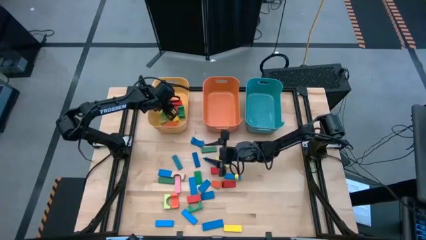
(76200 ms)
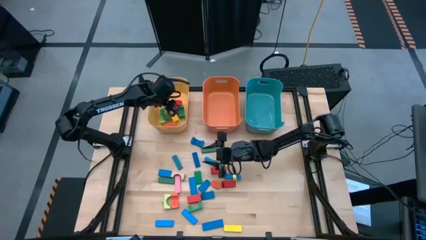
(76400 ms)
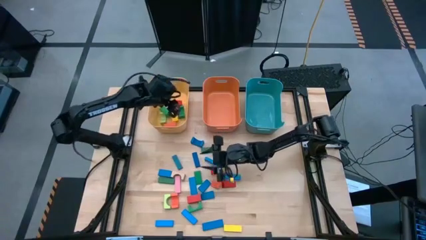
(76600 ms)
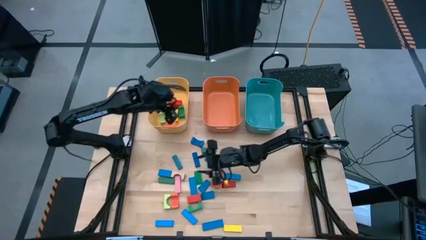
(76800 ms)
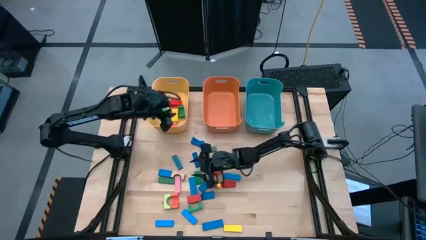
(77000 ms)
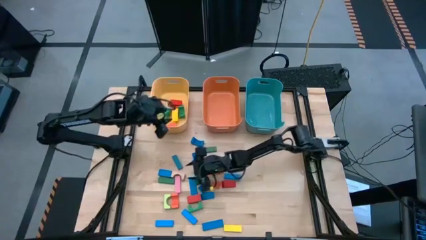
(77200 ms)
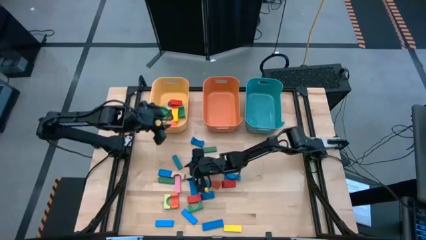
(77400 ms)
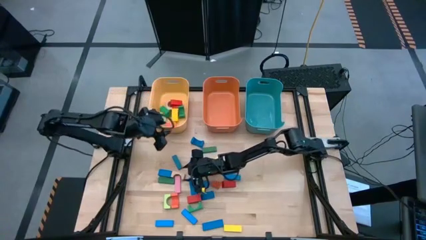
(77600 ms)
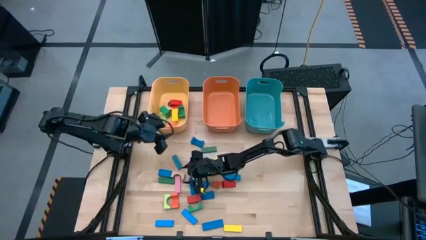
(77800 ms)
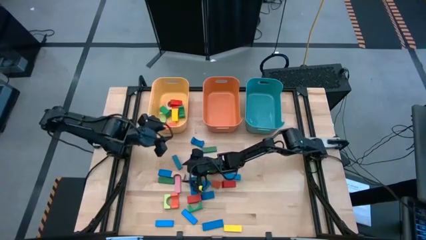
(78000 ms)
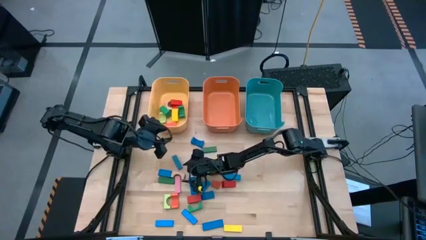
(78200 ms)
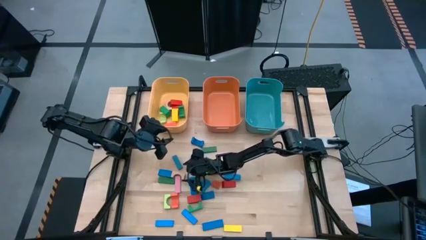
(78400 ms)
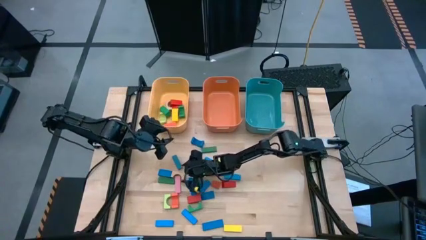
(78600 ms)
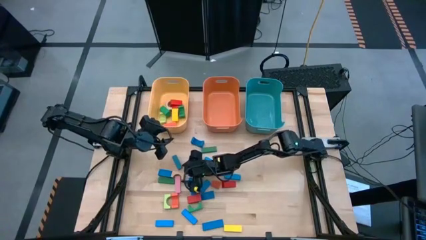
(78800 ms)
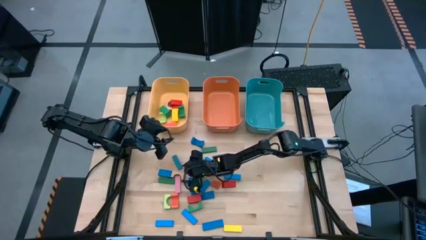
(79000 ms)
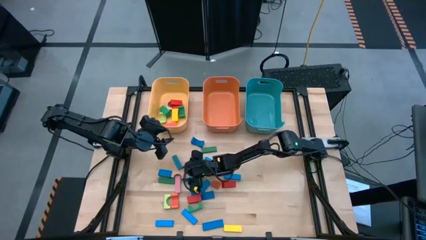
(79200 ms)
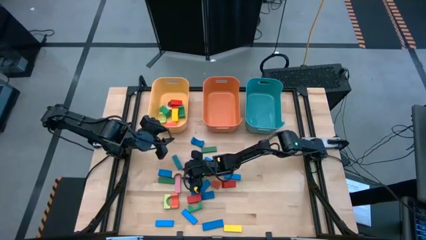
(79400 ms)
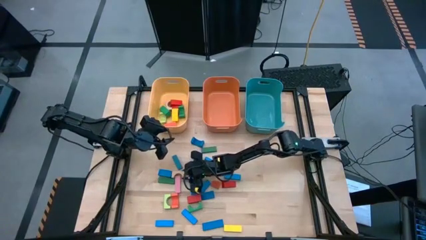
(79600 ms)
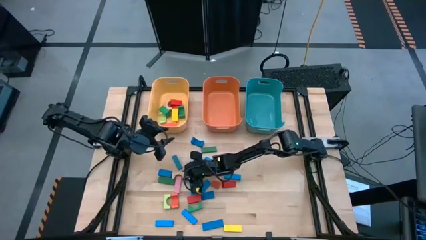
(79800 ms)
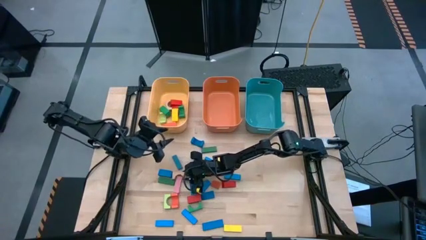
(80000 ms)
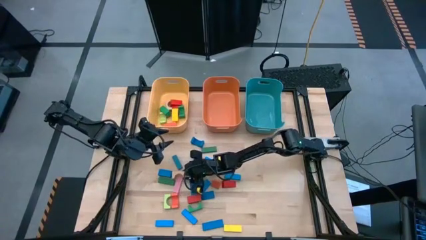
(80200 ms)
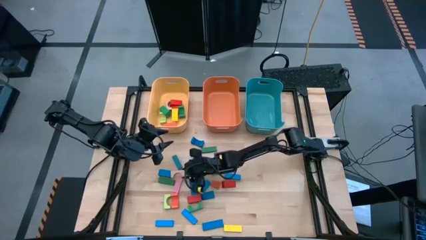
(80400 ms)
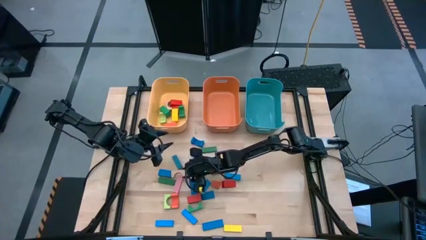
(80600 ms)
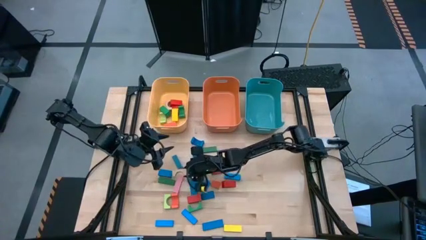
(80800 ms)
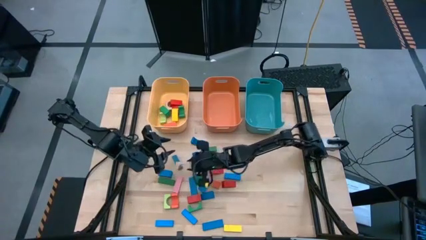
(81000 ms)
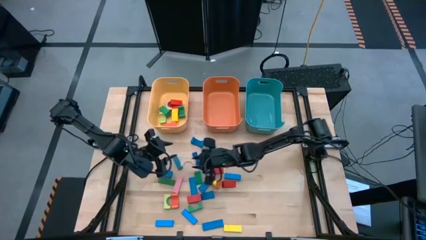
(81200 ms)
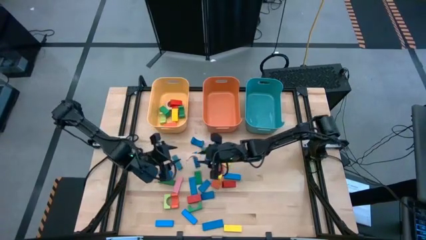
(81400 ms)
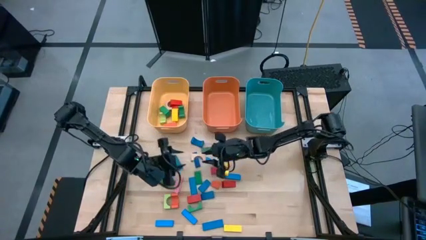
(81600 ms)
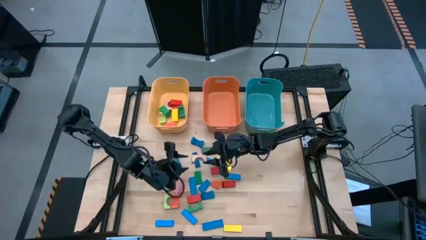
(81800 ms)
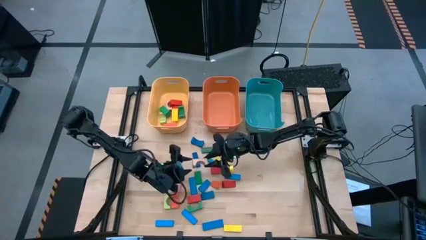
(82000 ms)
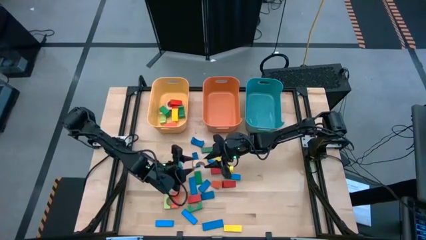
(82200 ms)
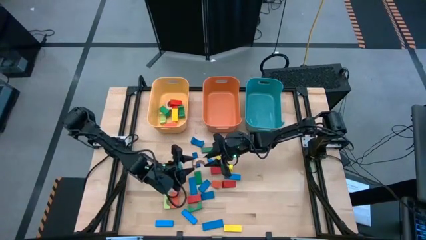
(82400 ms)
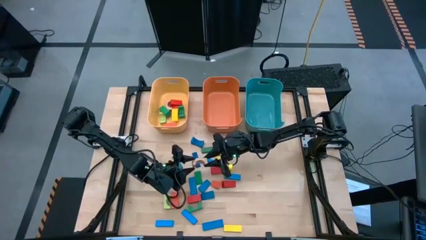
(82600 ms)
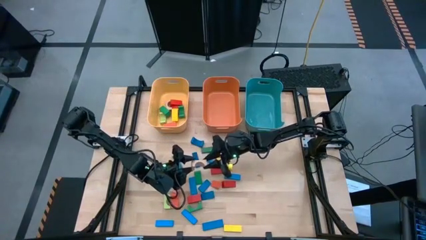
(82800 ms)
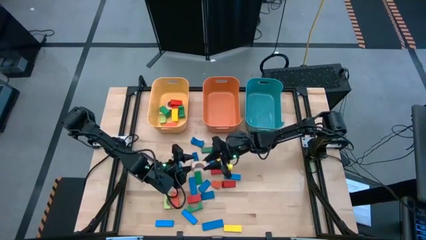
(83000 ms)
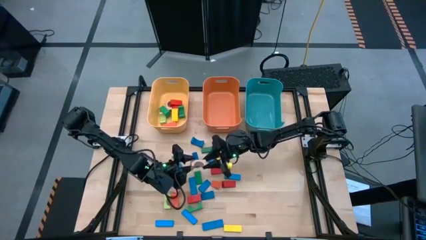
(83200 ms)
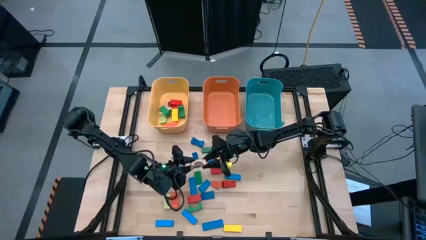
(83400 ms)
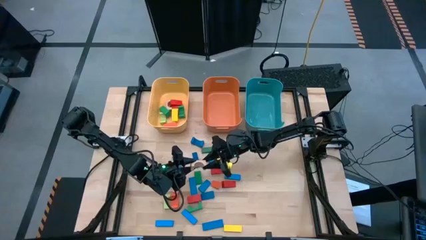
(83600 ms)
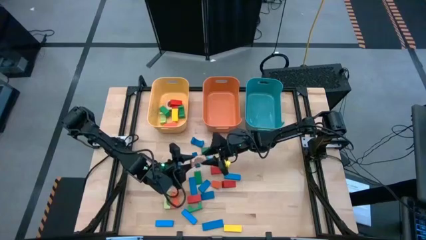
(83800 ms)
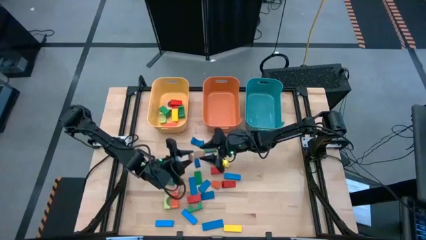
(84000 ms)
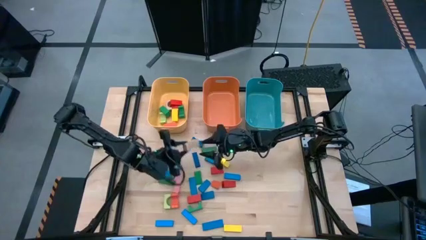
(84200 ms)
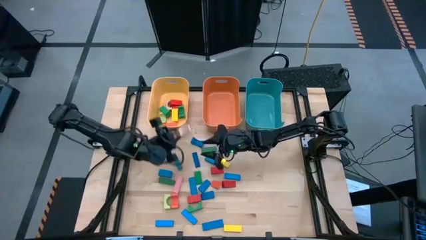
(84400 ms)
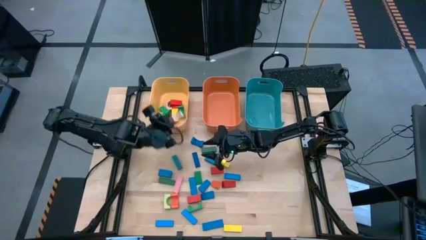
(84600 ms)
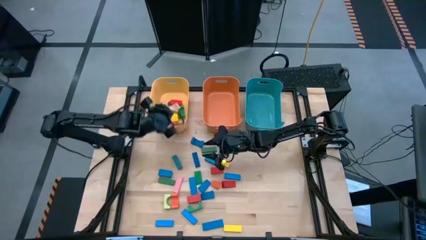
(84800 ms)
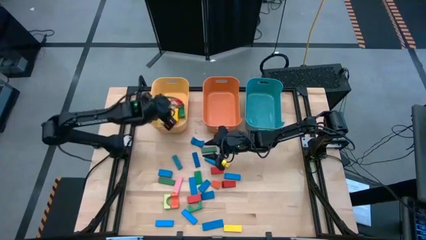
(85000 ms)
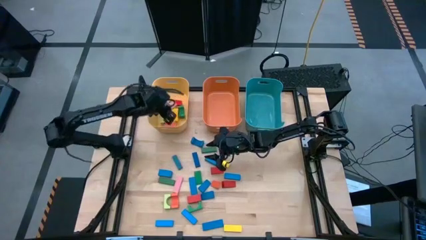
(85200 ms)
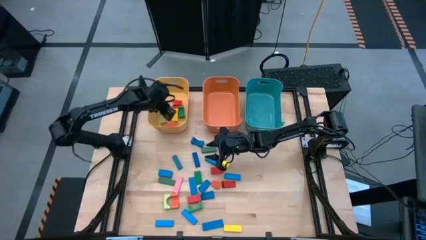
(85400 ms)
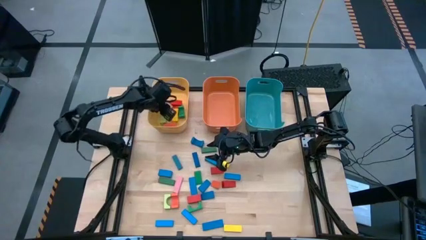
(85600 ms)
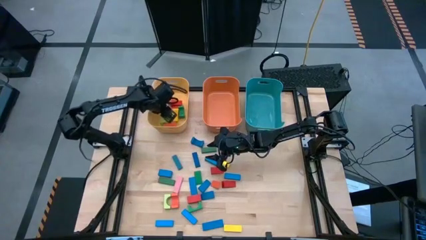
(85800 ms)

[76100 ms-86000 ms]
Task: Sort blocks by size
Put the gray arch block into the yellow bin

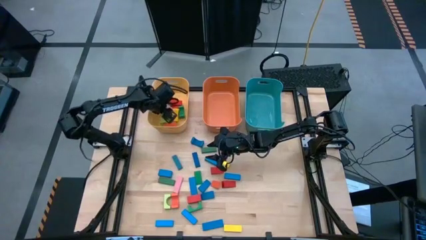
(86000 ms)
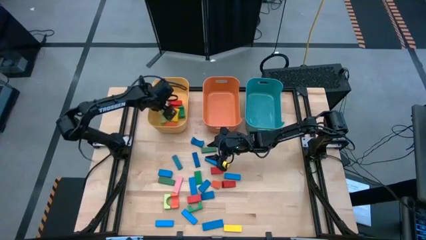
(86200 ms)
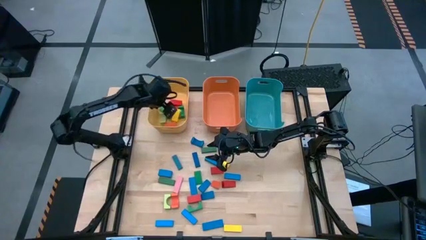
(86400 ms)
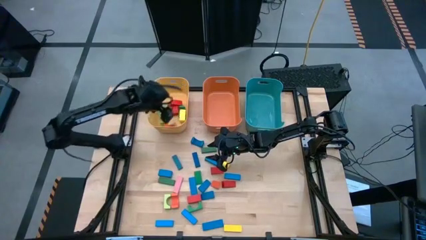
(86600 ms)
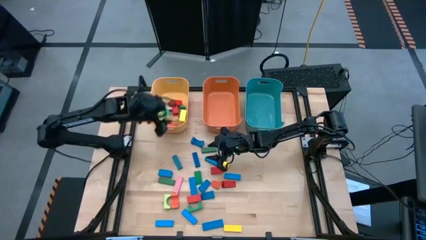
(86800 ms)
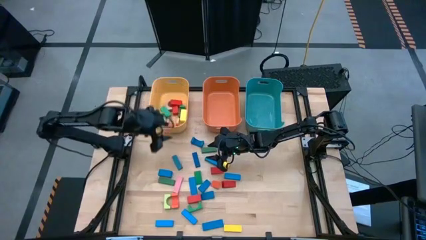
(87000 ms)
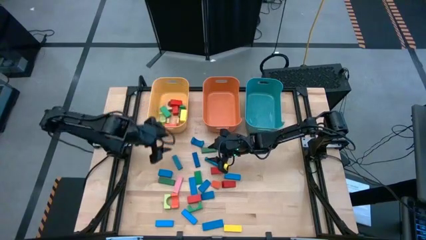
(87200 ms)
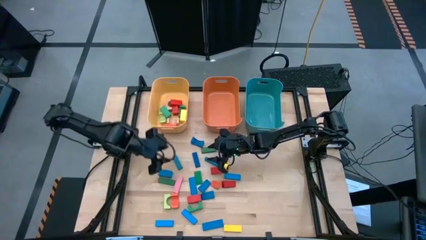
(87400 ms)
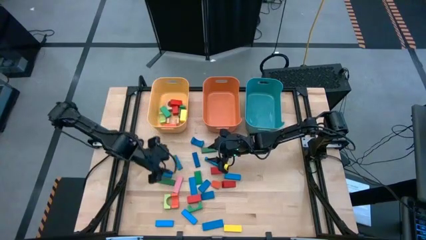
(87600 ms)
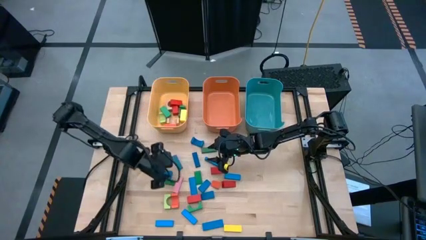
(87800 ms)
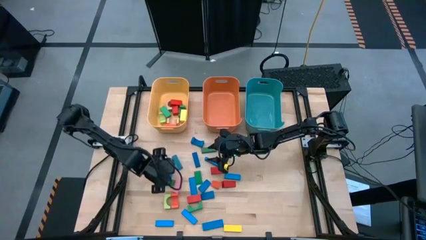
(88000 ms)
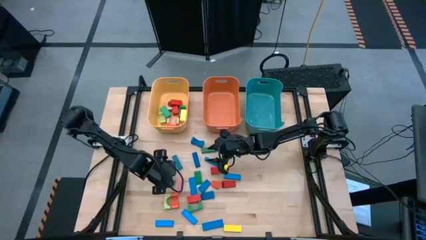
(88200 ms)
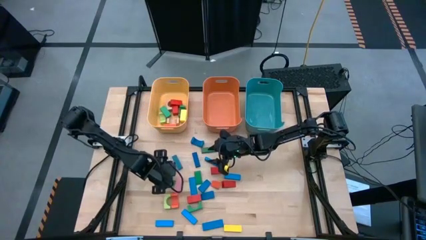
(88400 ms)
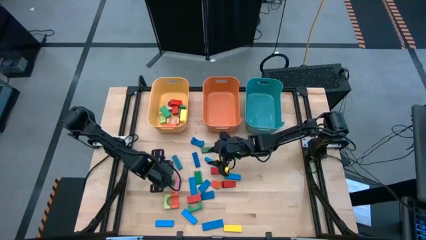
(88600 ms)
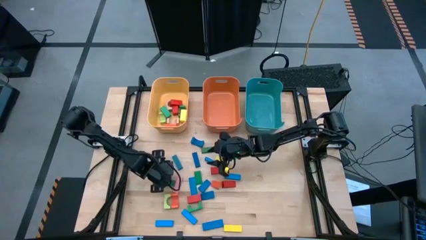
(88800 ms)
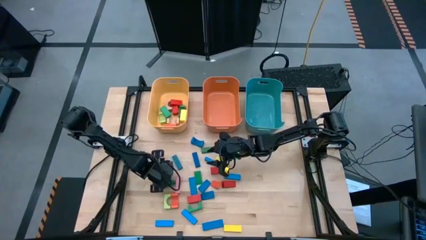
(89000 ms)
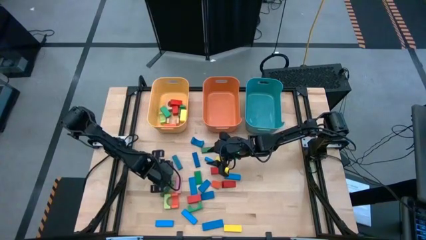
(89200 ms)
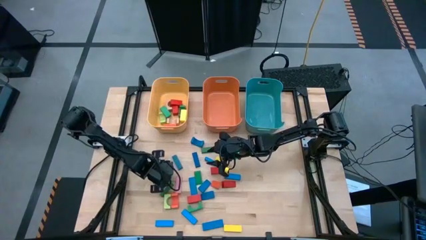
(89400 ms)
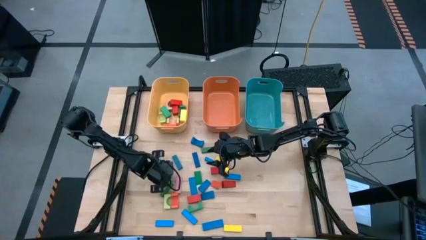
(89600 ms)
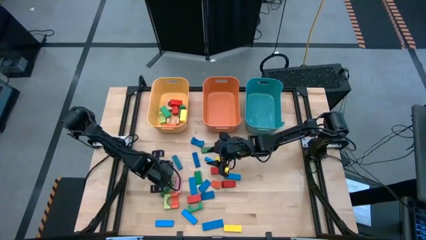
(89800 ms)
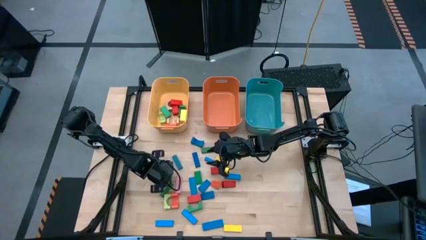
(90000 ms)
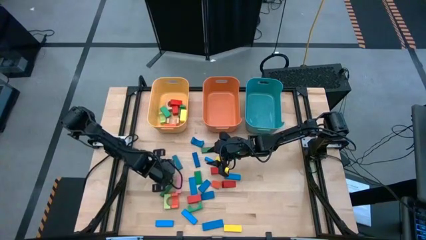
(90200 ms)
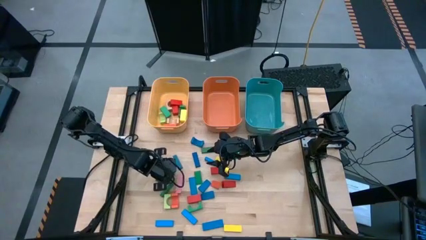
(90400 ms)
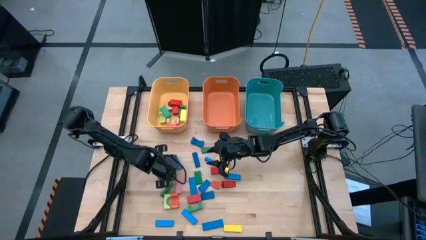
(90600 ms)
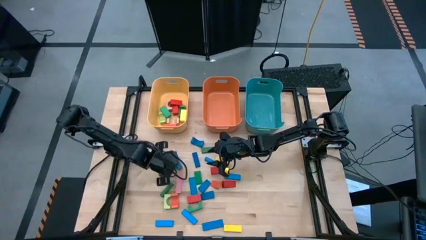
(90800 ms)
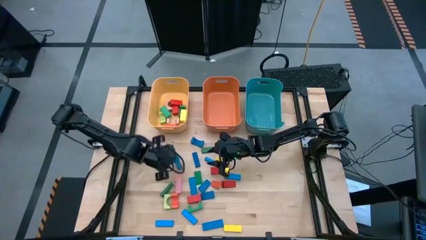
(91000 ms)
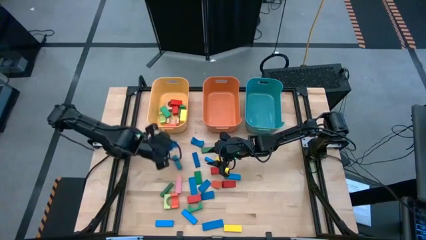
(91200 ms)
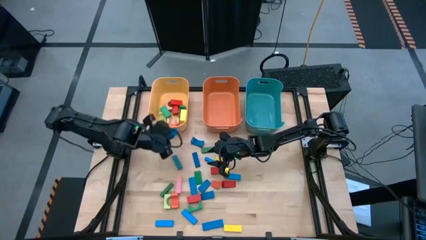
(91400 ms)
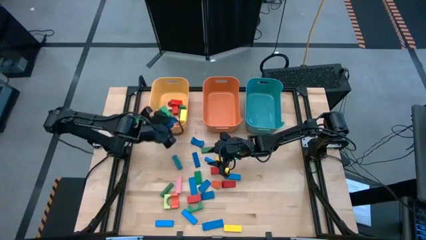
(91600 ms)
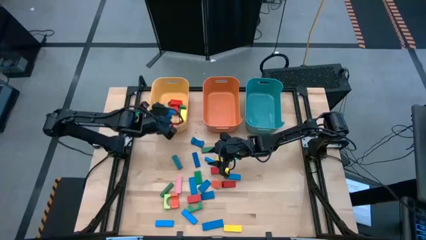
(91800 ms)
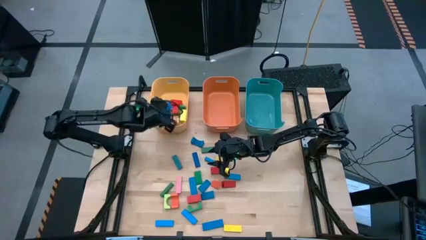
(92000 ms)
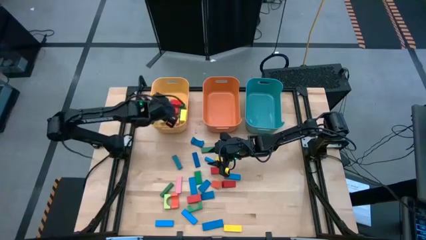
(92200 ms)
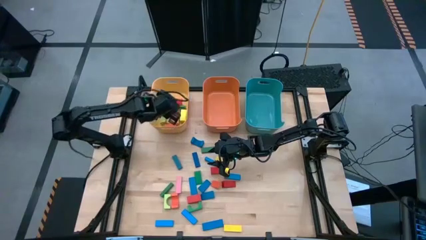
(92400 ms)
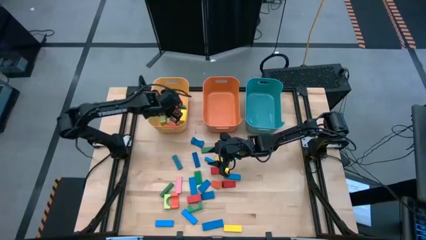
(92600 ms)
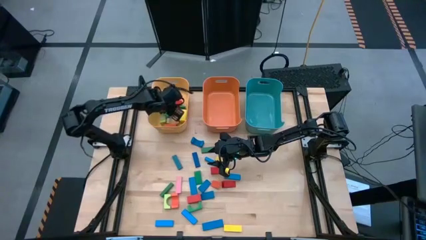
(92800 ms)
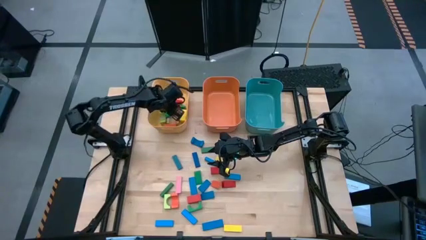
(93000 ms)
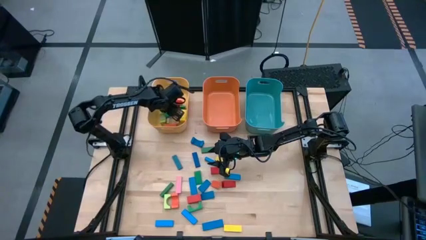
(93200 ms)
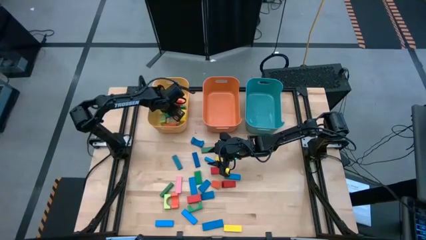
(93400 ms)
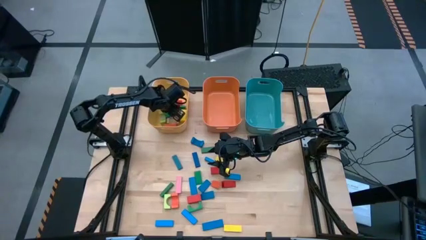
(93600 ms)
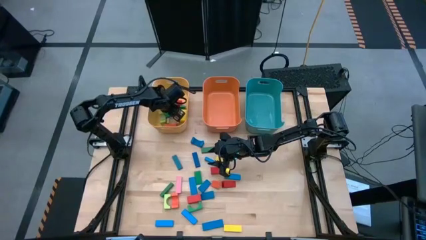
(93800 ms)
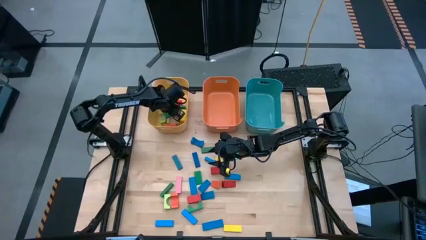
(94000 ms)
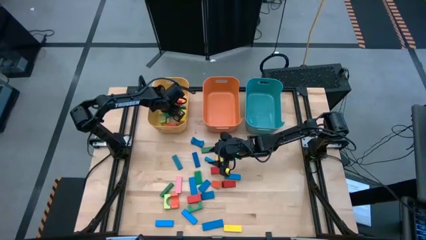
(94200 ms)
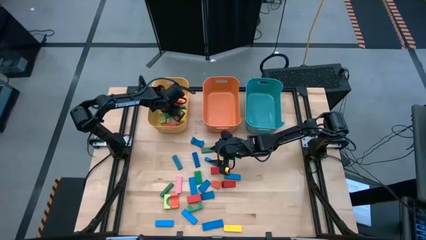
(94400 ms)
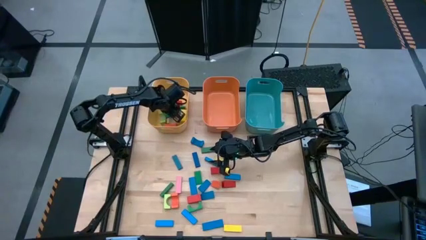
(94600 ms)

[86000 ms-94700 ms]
Put the blue arch block into the yellow bin
